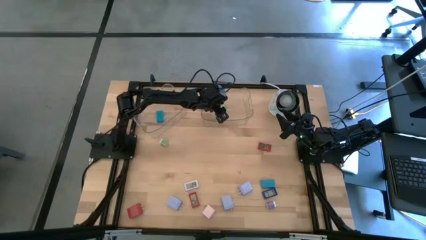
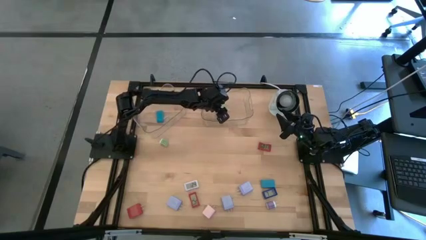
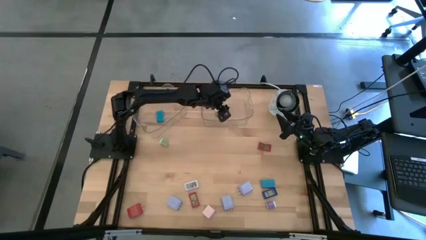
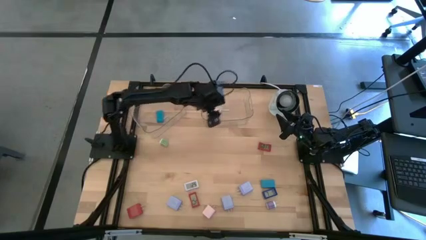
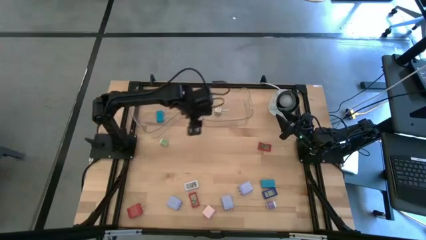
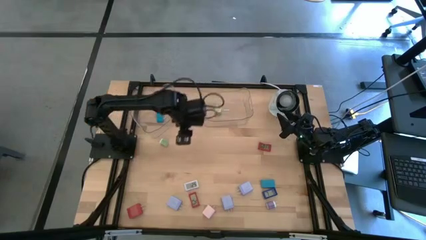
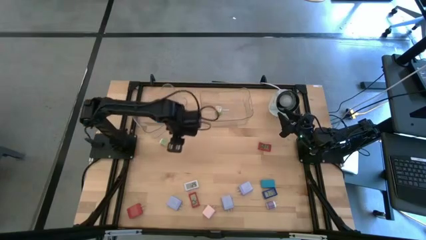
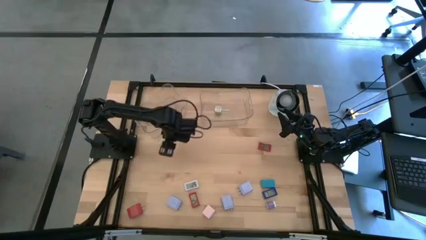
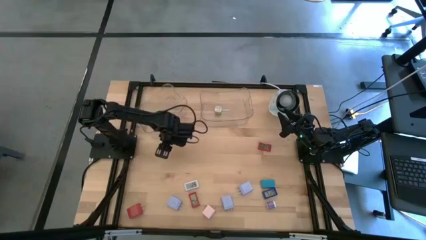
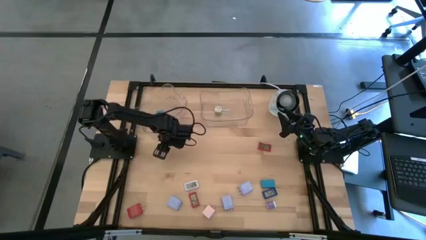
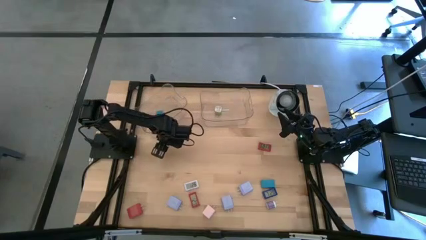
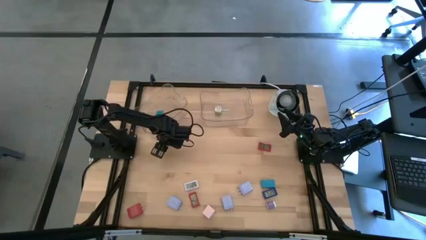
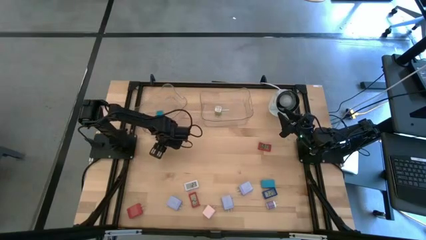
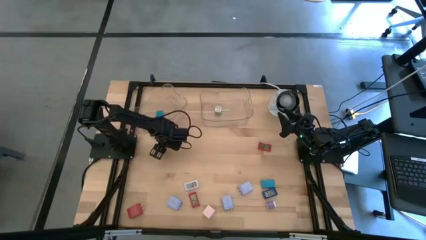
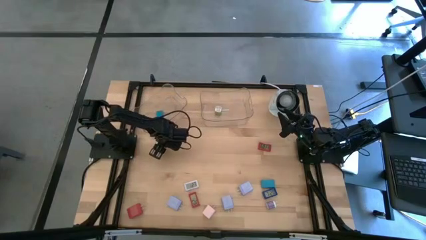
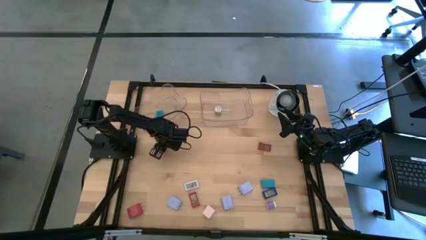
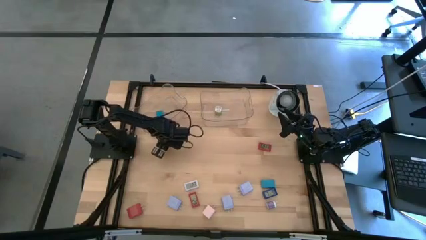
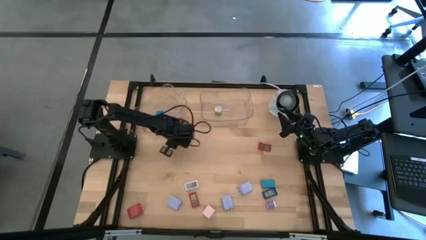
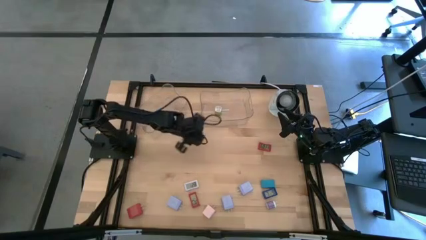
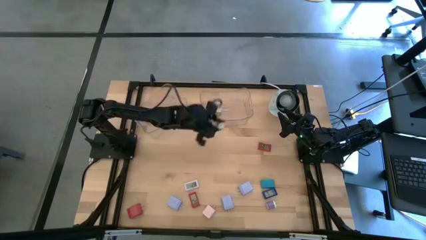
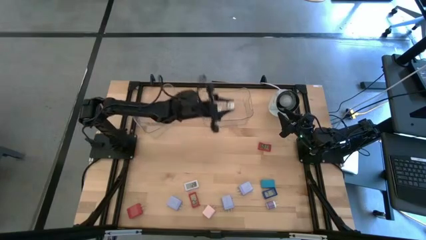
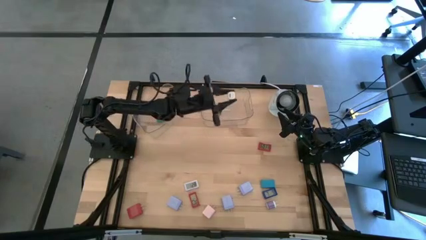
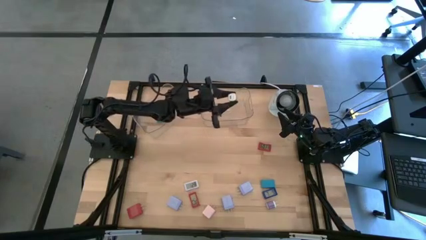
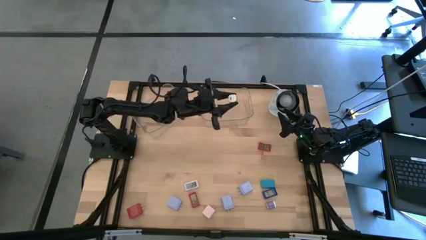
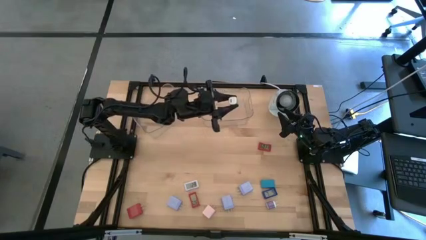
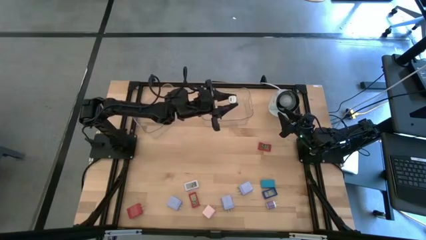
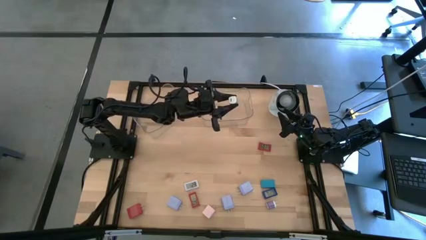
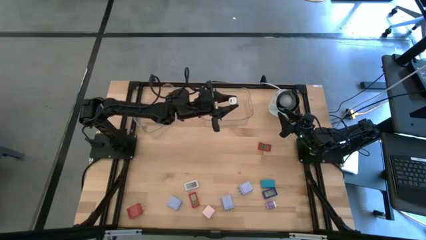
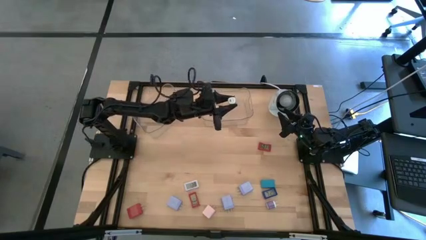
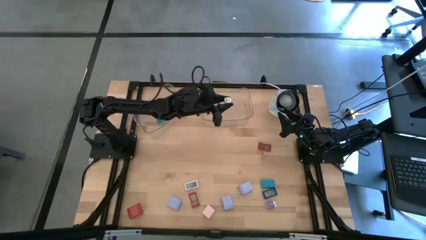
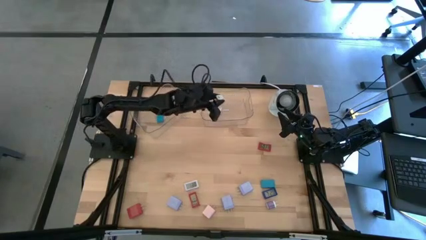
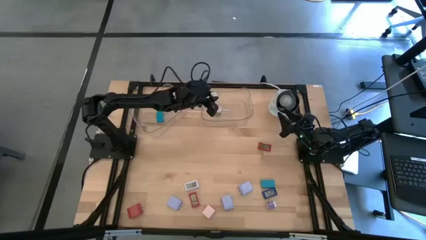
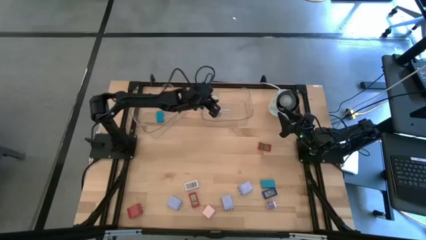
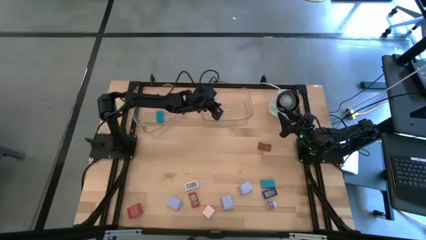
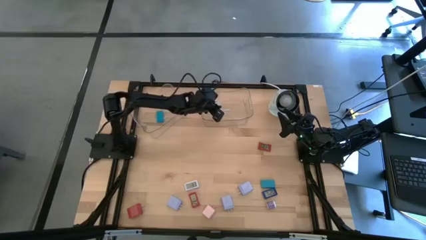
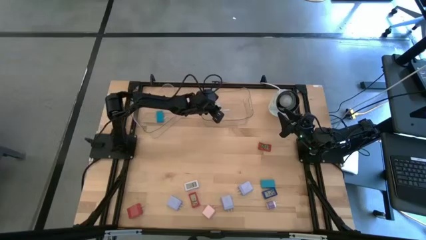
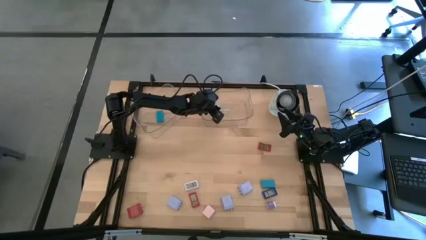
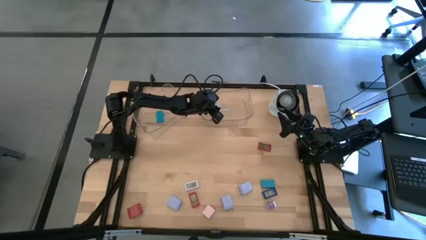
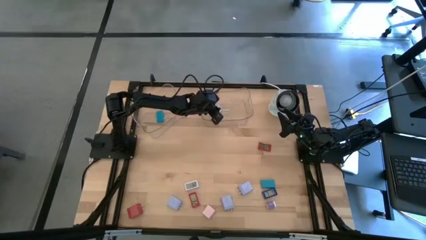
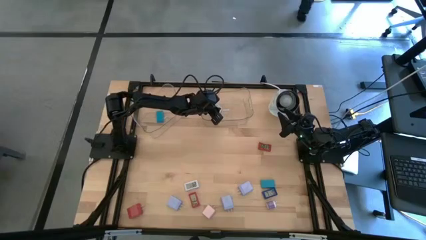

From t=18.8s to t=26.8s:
Task: Pick & Place Office items
Put the green charger adapter into the right transparent bin

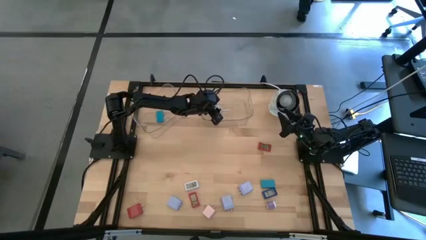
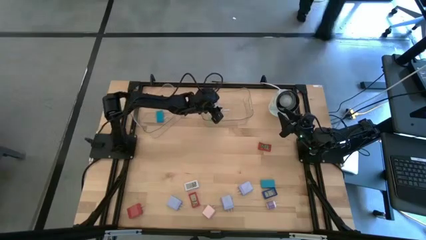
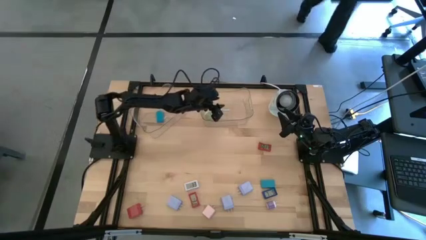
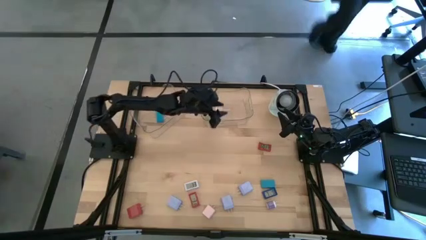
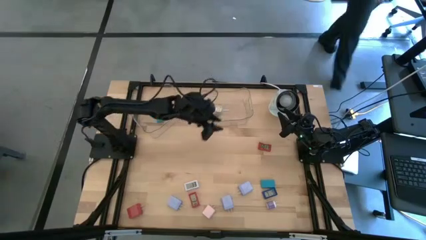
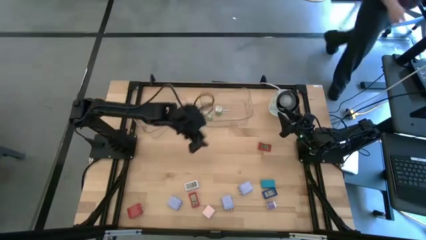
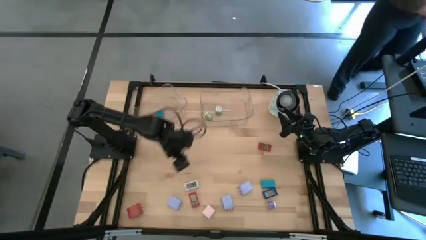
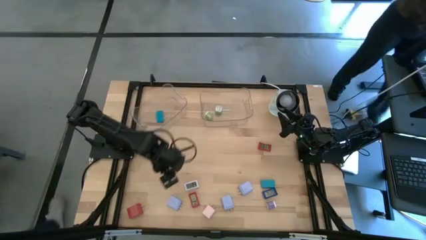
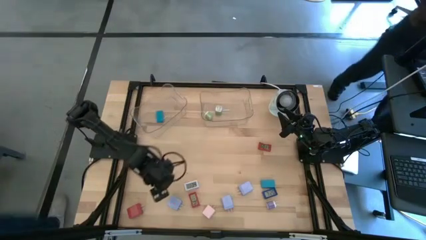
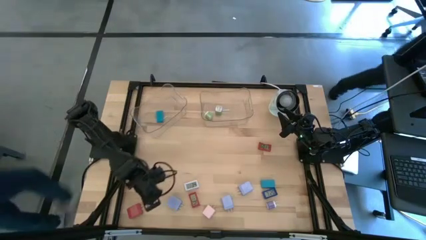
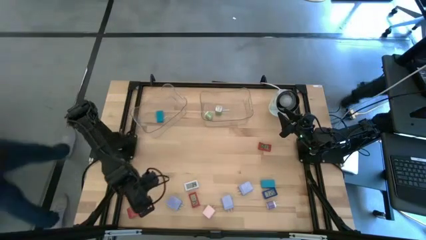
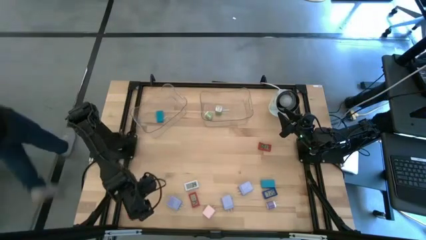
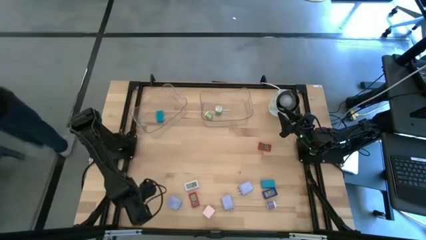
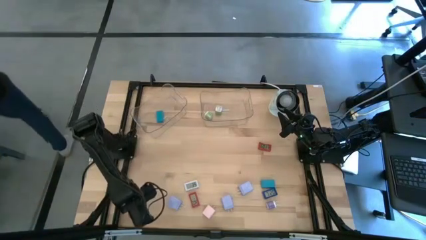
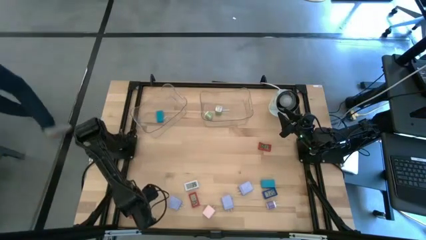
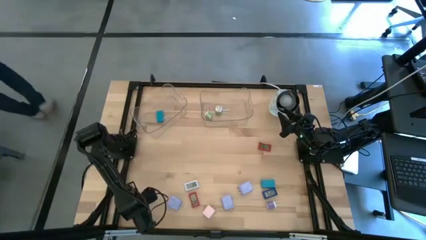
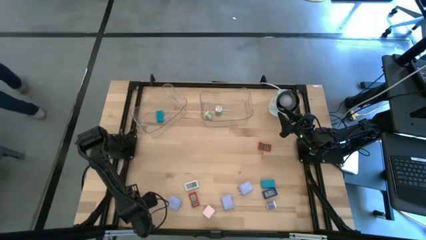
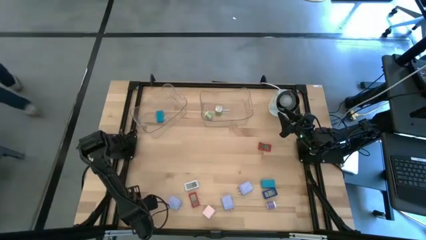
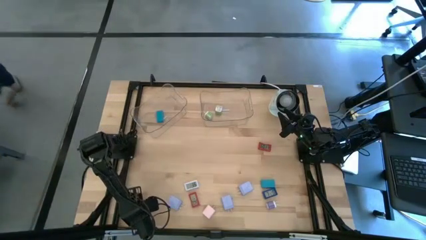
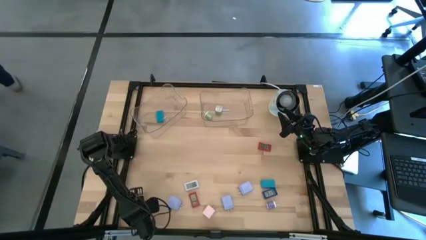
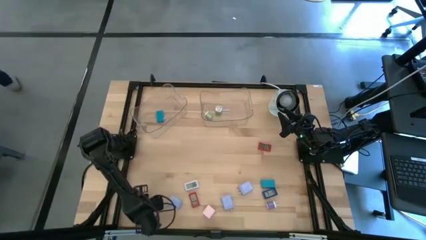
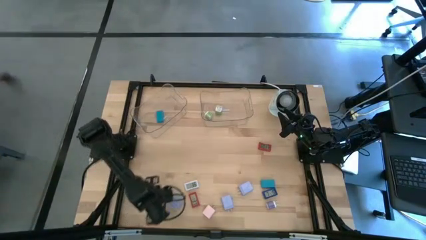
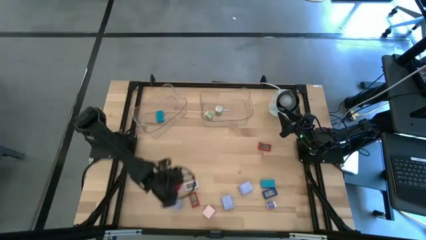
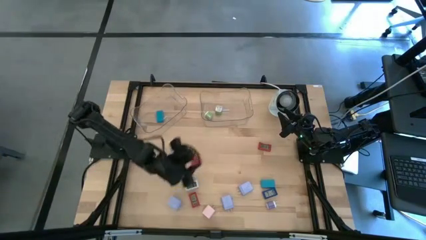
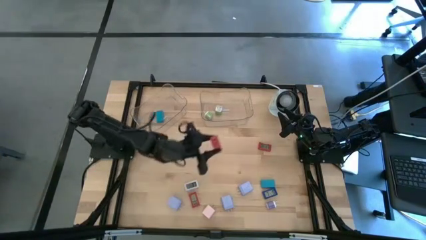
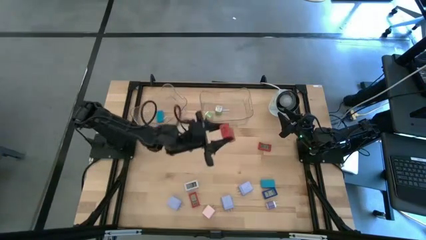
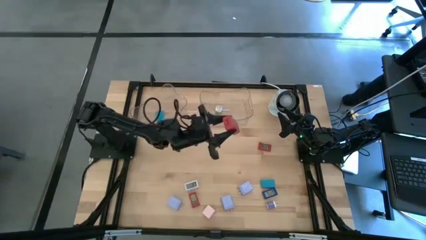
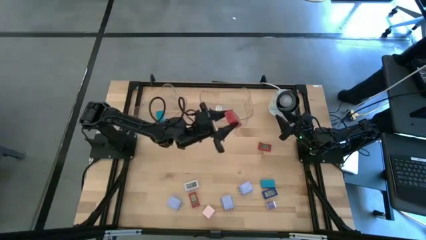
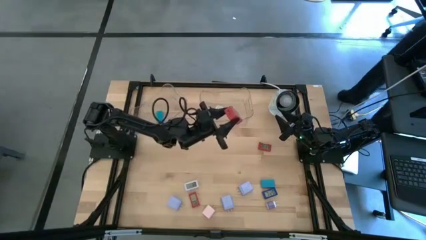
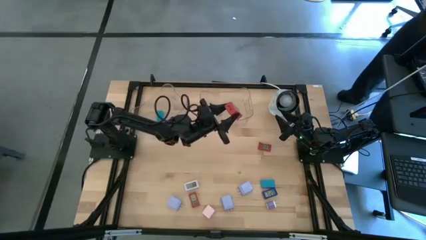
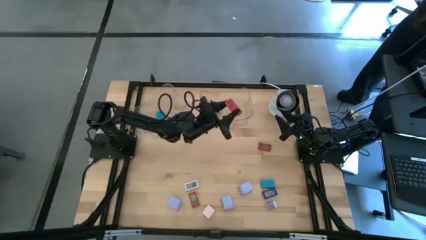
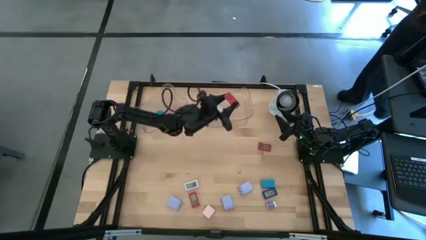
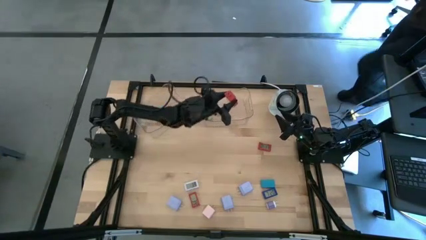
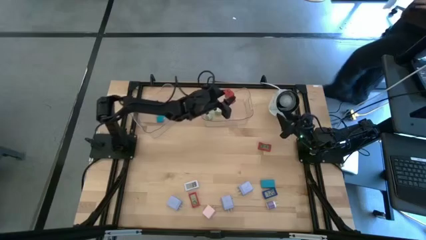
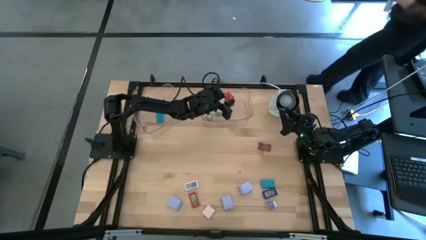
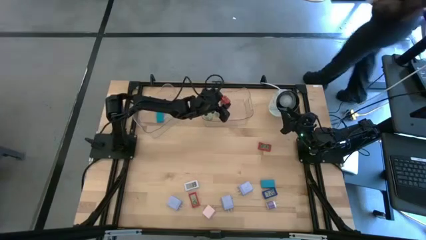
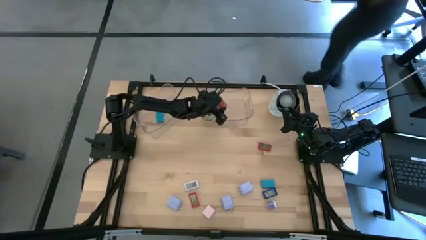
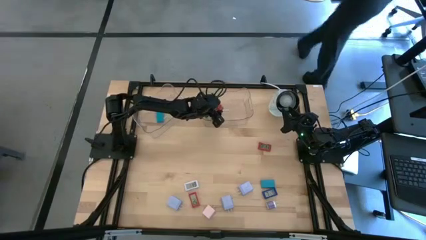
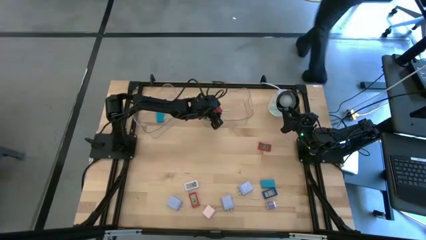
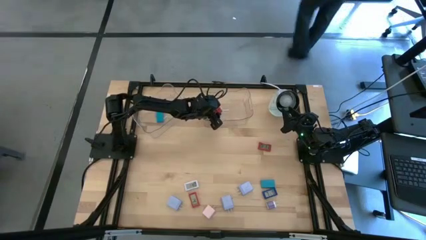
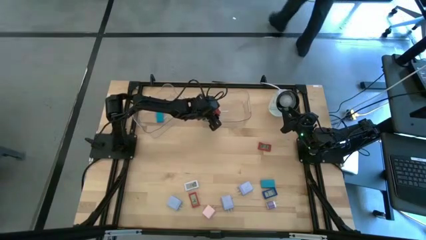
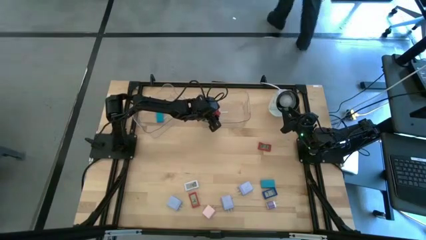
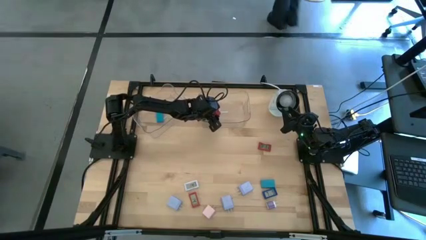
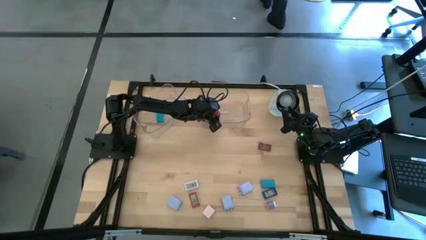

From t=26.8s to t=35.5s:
Put the red charger adapter into the right transparent bin
